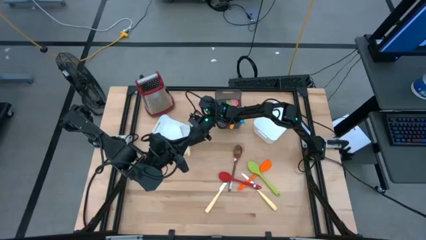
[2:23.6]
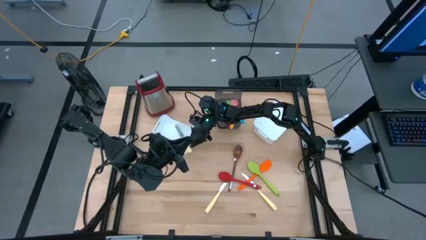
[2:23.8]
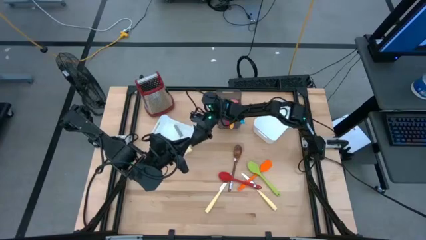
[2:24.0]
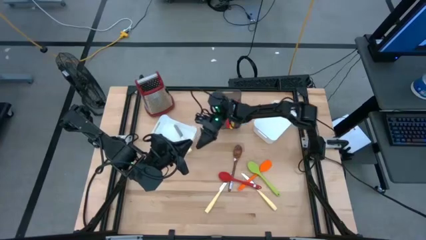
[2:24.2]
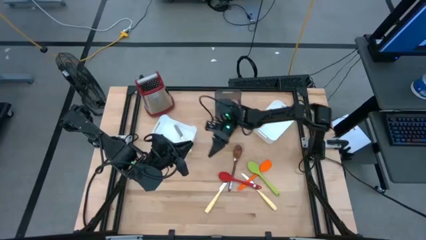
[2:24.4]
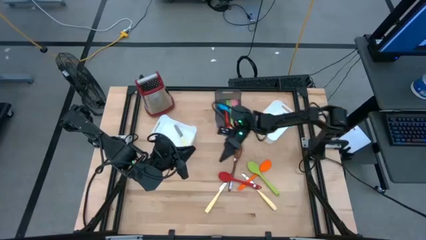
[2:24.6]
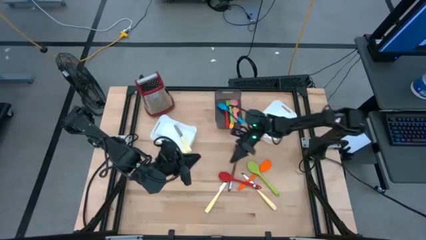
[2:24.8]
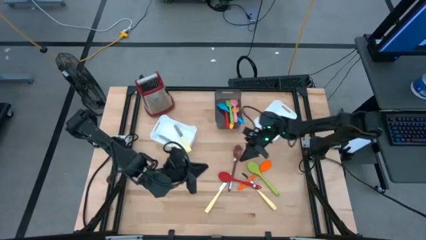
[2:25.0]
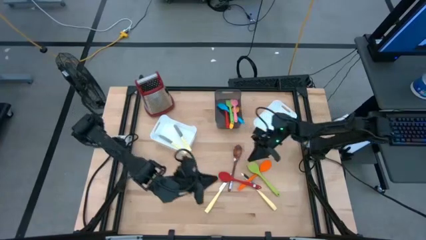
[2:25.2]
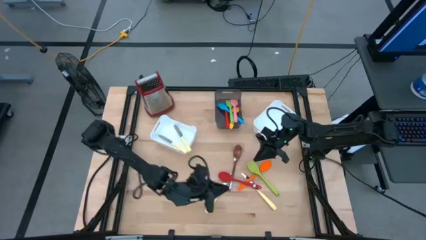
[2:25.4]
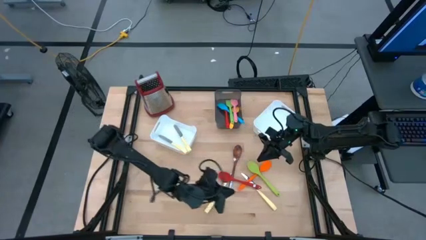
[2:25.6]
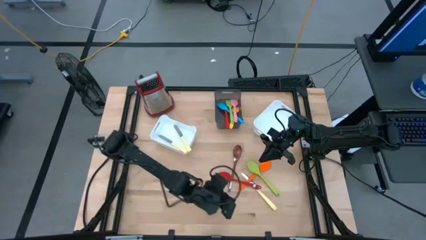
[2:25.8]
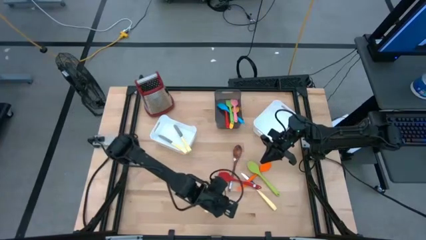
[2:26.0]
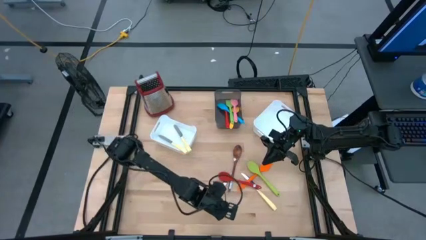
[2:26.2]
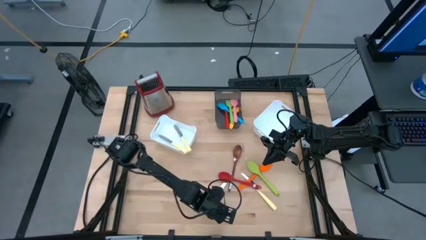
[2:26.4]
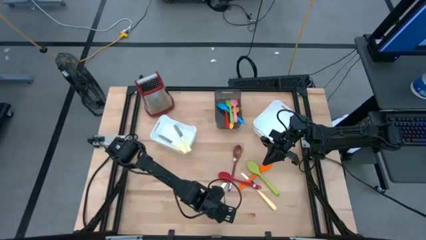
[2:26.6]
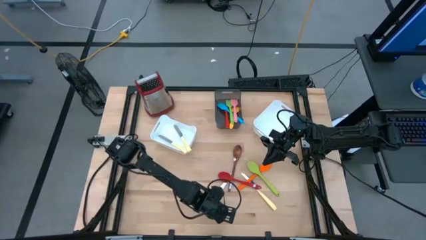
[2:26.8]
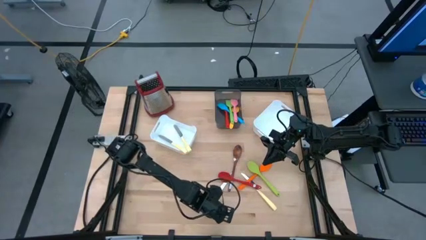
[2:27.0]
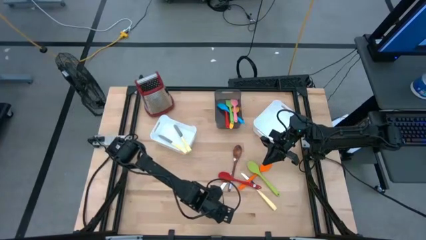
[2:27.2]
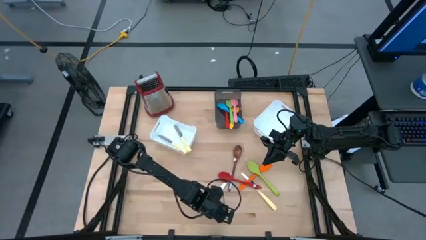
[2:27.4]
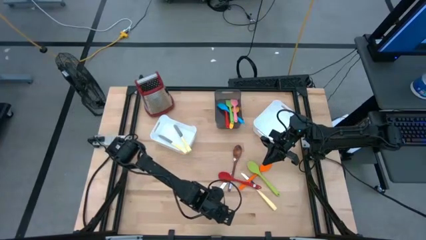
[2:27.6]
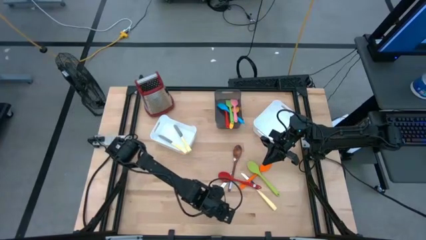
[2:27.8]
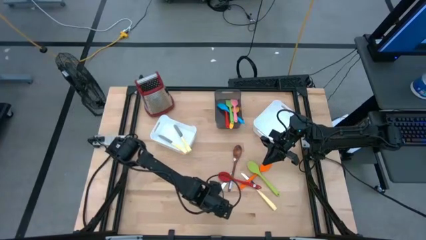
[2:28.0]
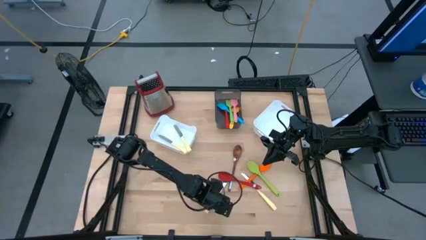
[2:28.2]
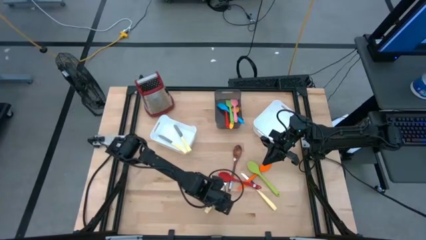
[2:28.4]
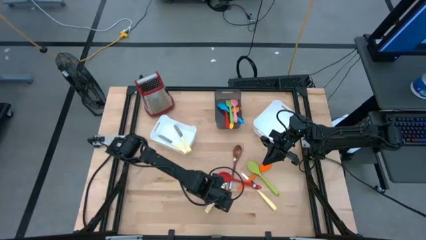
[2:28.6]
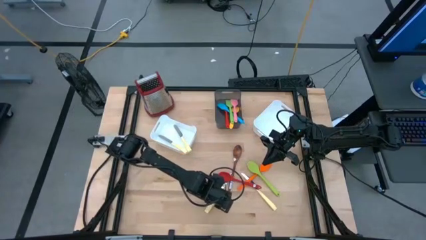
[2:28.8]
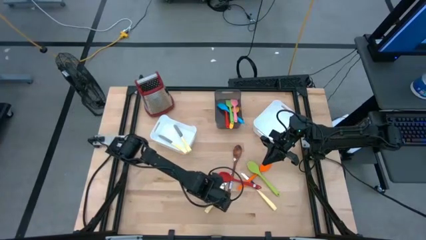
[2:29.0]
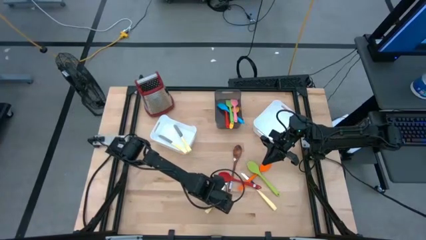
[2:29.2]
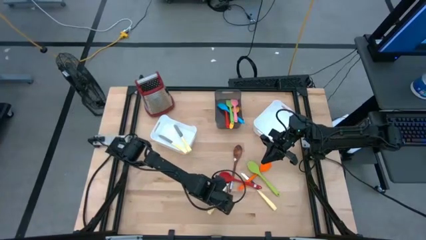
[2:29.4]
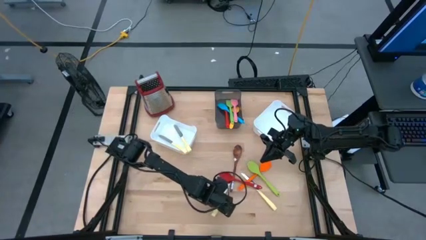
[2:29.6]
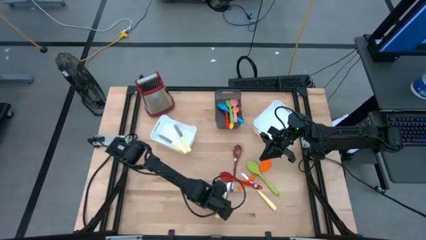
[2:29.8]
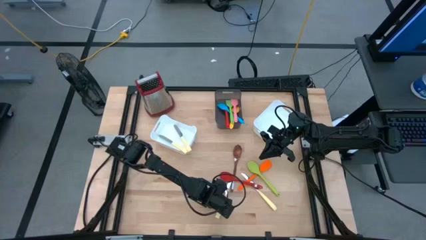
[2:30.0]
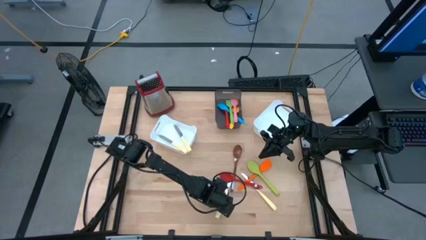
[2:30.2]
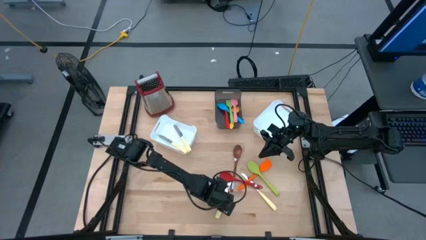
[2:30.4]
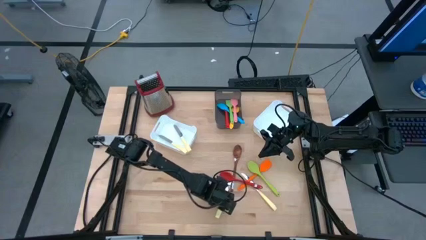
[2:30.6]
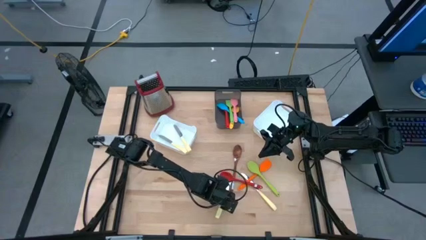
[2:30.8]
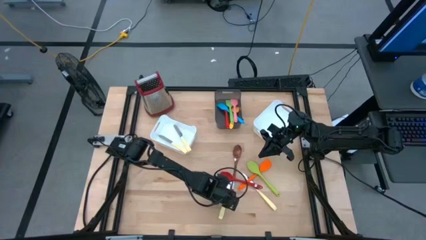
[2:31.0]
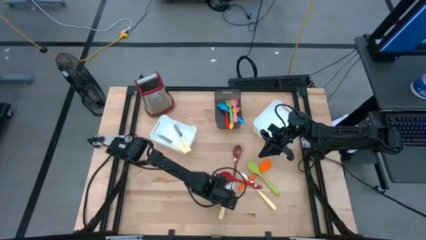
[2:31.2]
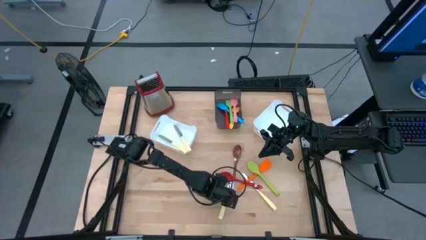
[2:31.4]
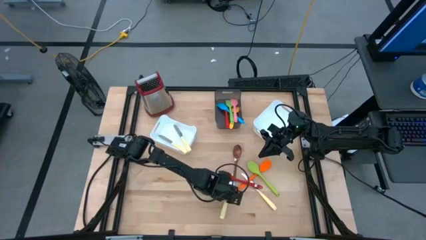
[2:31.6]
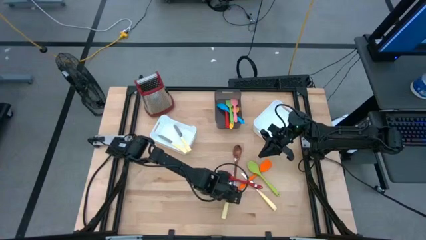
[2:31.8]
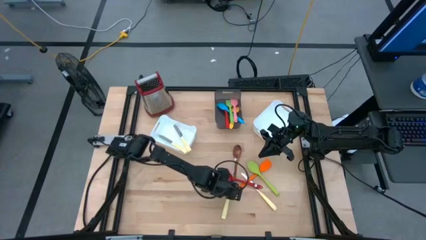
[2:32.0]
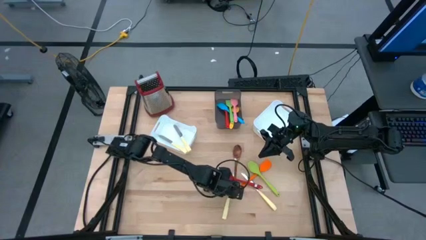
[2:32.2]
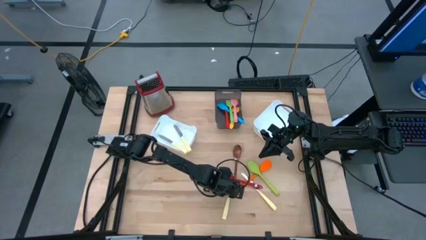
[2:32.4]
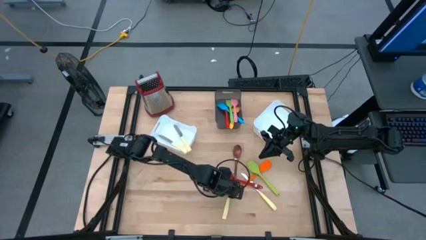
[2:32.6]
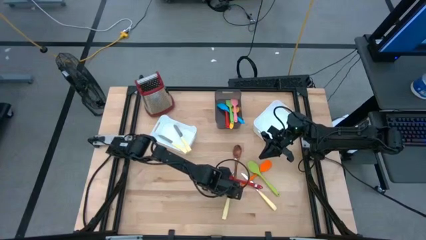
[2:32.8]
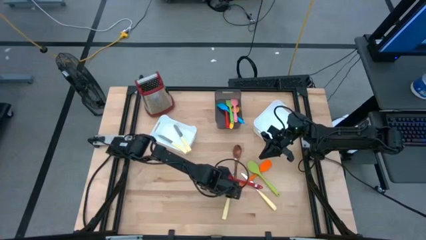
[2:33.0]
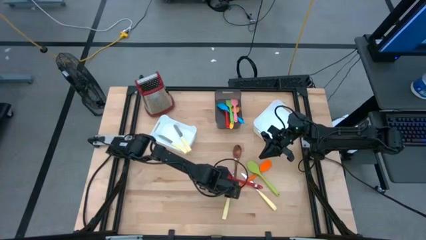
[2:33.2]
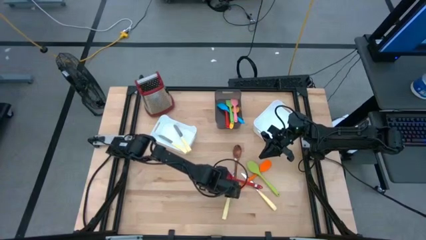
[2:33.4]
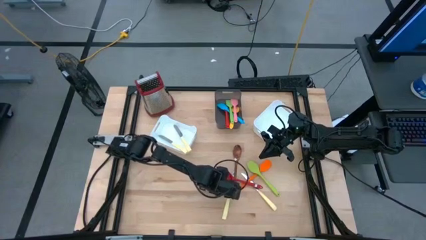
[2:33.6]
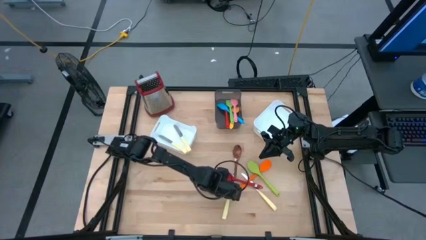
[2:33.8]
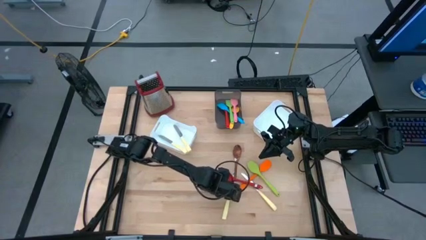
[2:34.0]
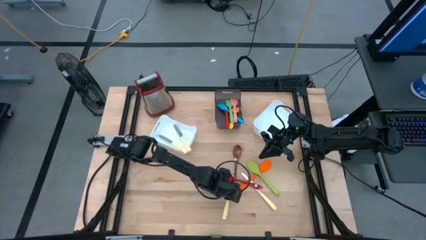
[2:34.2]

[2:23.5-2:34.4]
Task: Pick & Place Kitchen Items
Put the yellow knife into the left white bin
